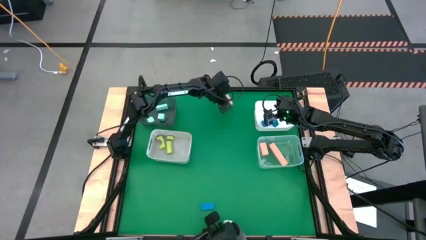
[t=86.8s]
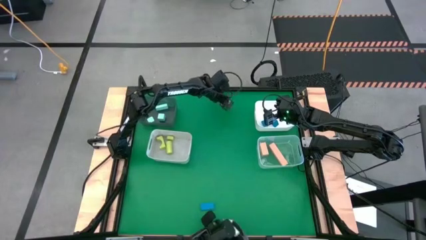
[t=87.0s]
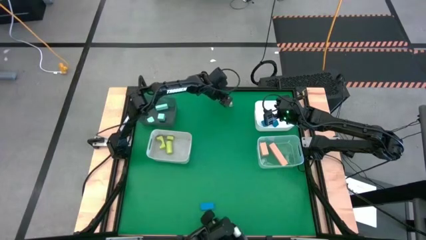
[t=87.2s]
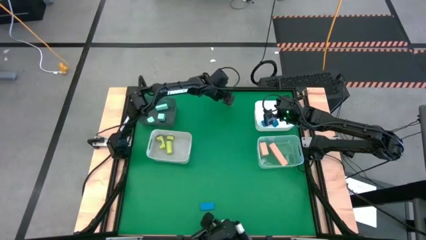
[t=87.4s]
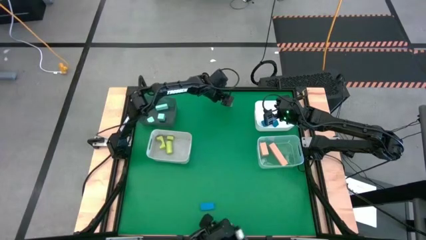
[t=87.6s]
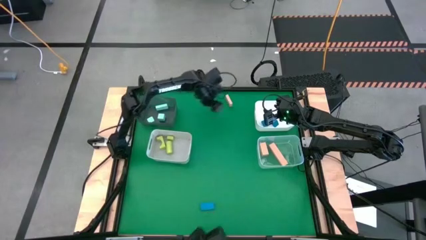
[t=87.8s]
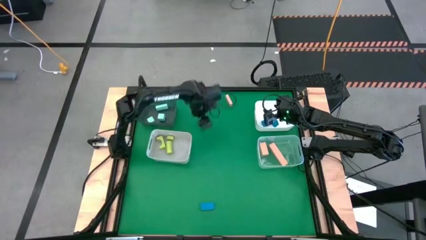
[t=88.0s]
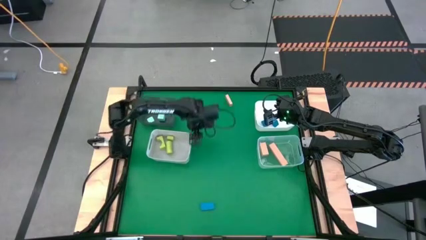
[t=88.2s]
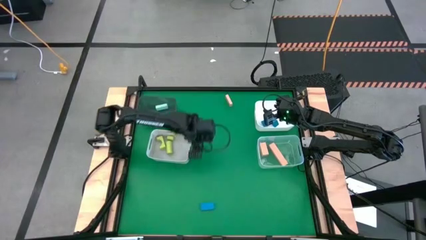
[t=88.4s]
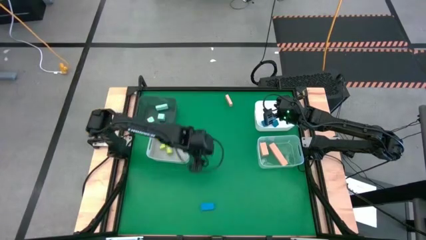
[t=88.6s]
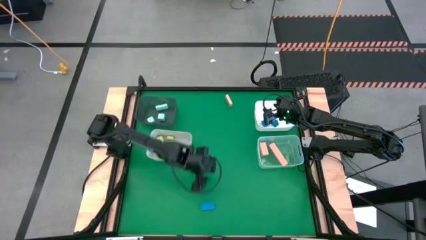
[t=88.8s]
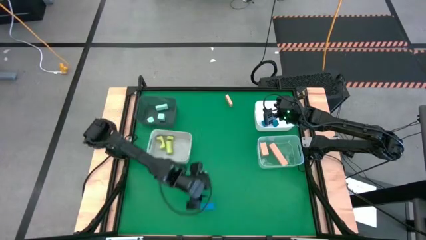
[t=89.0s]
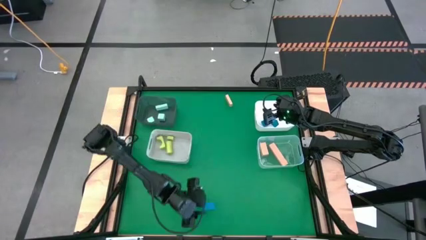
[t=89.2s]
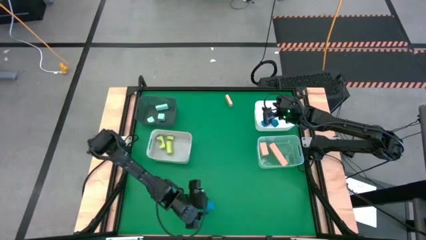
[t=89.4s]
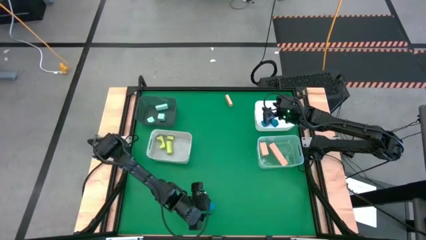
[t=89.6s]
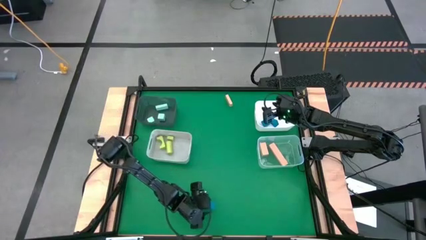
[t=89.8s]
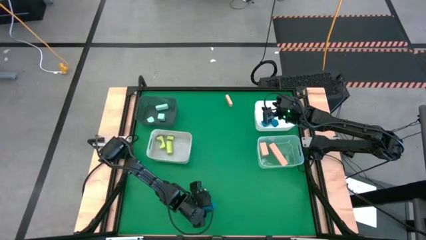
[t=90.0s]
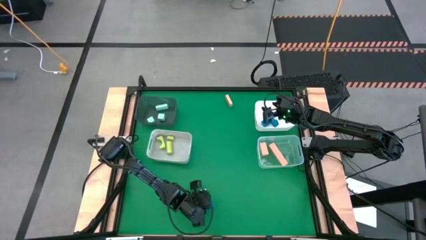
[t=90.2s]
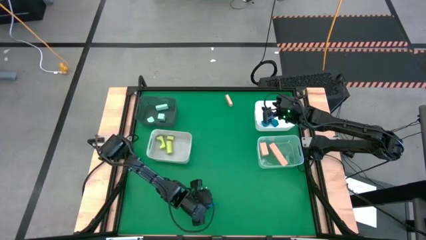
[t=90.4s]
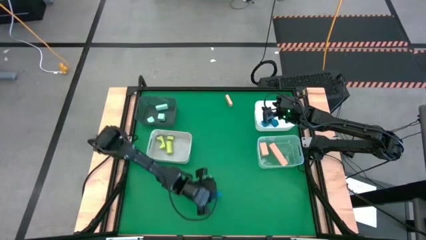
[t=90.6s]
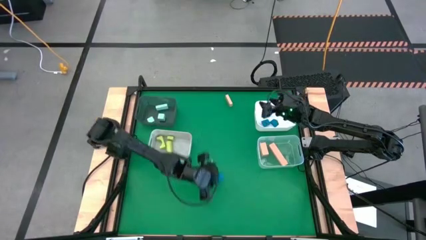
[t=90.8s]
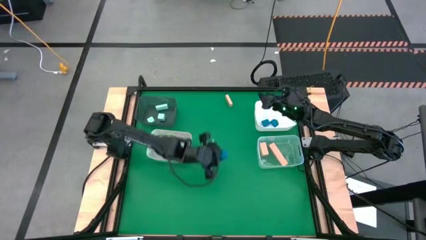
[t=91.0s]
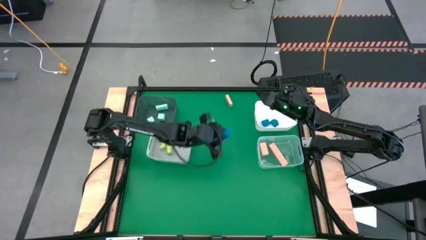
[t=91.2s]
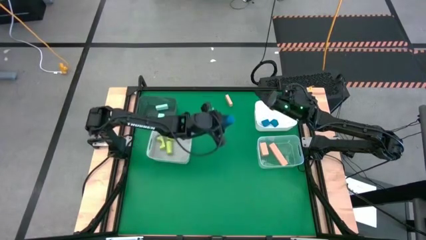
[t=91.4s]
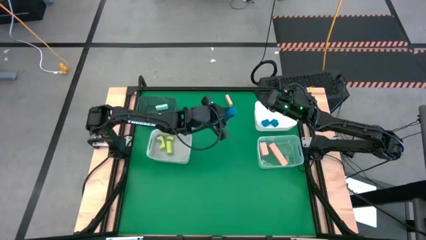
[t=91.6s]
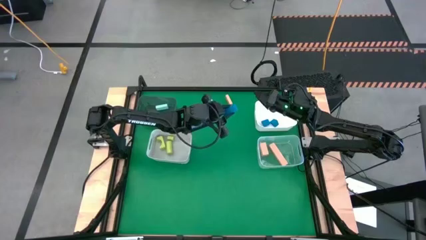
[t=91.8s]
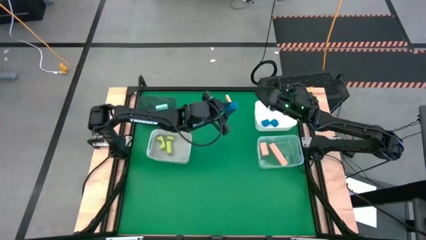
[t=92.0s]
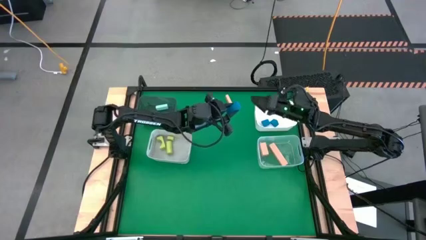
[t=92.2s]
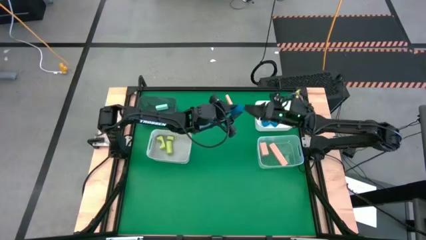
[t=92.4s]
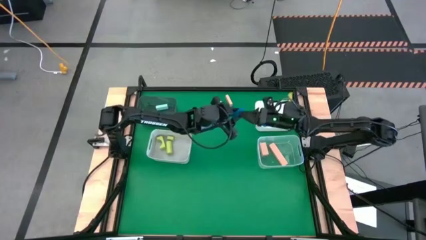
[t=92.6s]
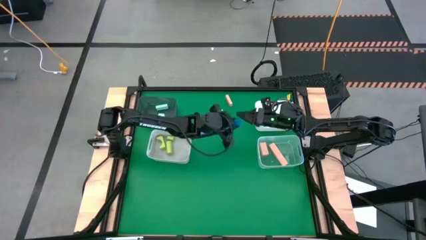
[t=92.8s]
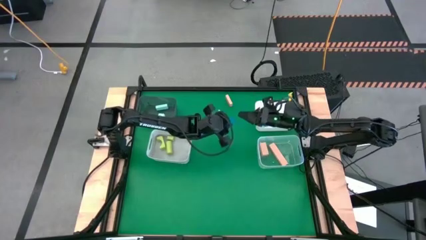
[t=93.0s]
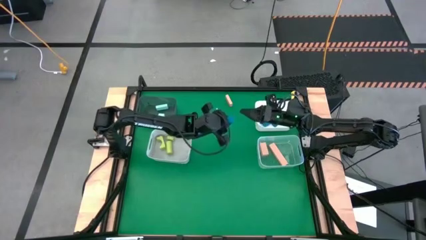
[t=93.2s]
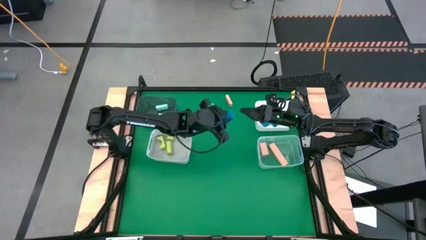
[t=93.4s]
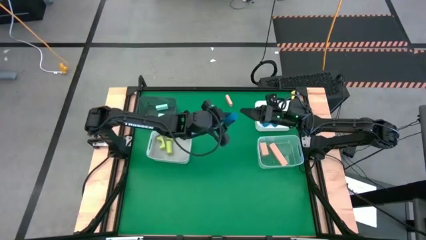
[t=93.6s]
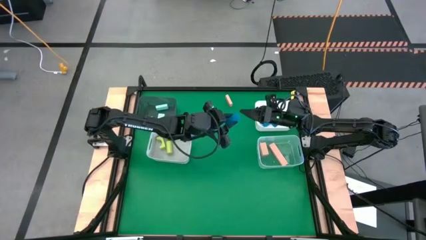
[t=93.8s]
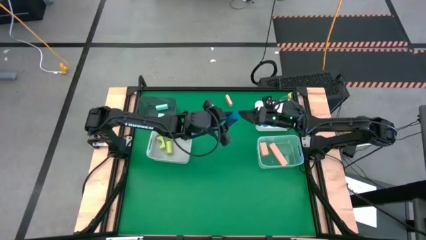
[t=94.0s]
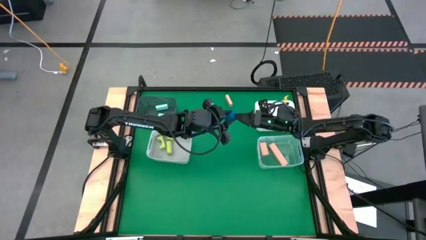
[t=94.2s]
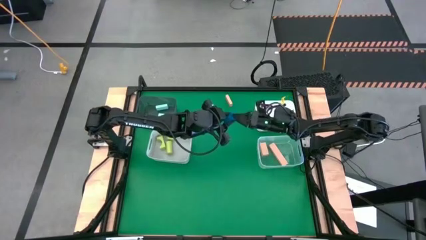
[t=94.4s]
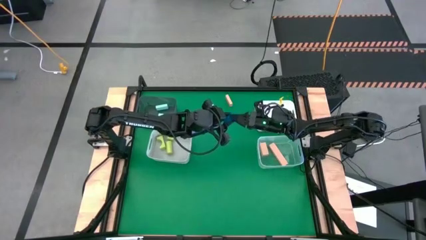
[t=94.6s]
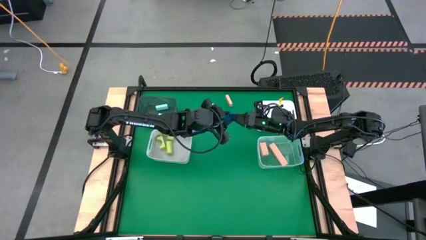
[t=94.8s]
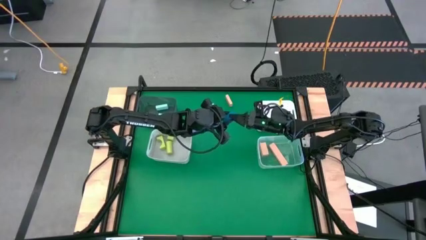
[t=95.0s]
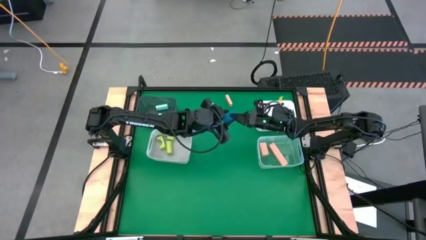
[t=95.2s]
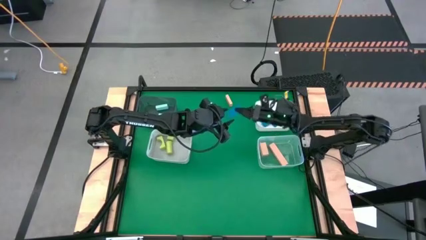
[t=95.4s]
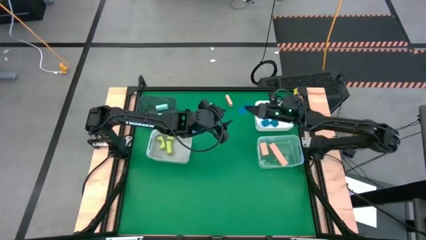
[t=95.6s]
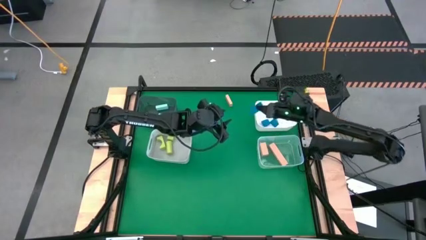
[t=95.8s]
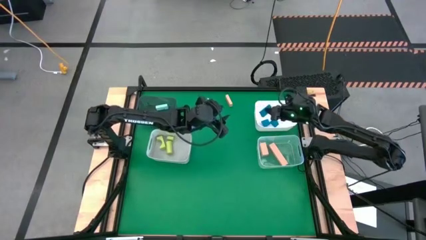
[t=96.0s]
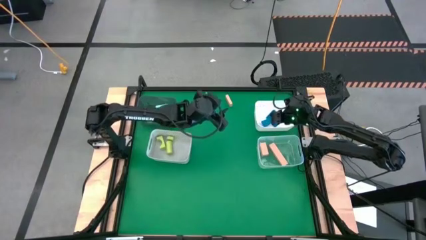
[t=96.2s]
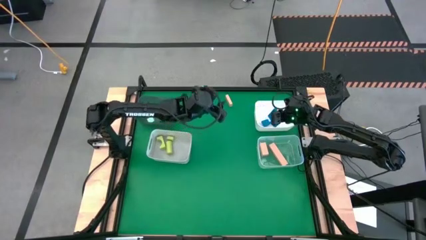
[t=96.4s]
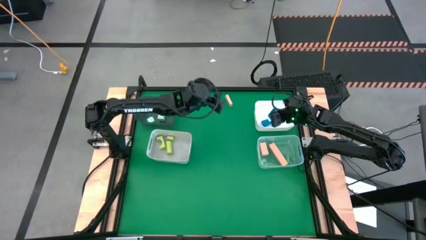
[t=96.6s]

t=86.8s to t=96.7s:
Task: Sort & place blocks by color
Put the blue block into the white bin

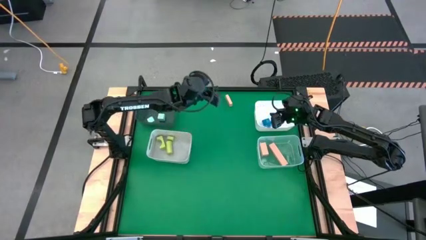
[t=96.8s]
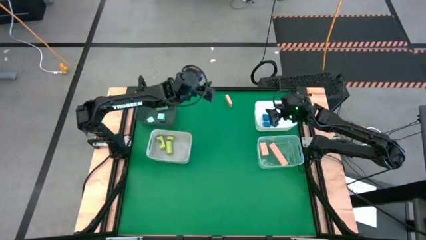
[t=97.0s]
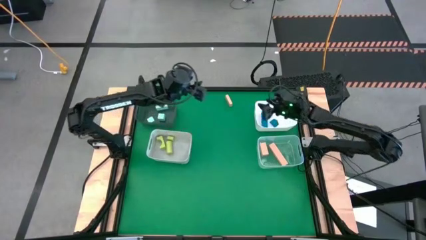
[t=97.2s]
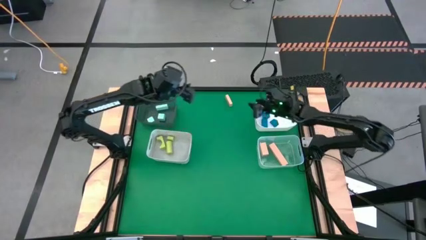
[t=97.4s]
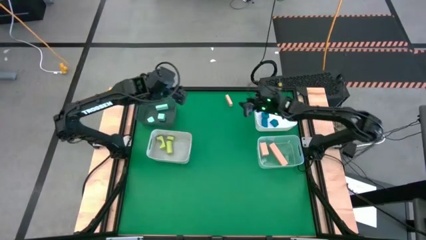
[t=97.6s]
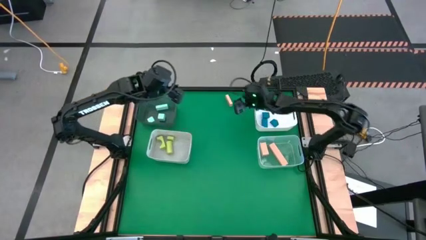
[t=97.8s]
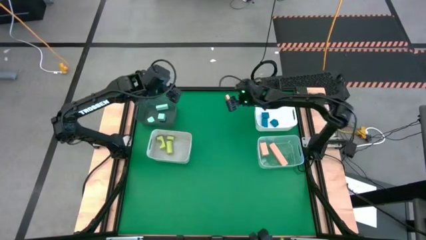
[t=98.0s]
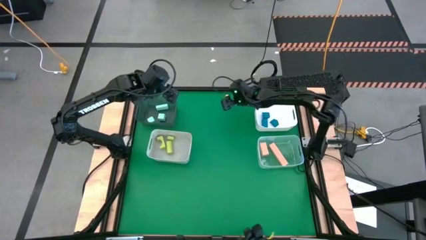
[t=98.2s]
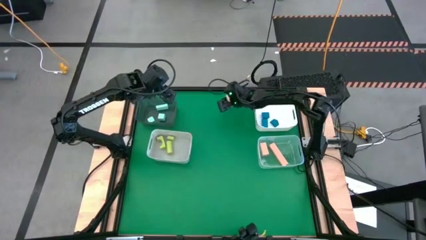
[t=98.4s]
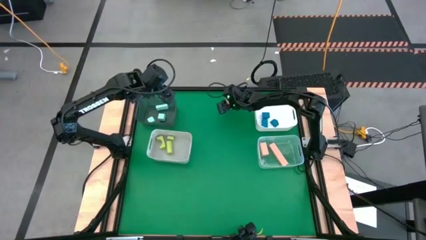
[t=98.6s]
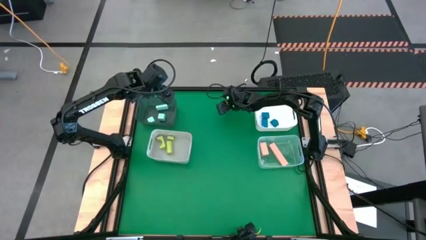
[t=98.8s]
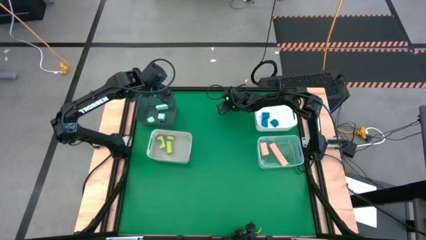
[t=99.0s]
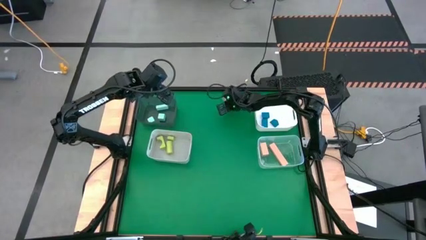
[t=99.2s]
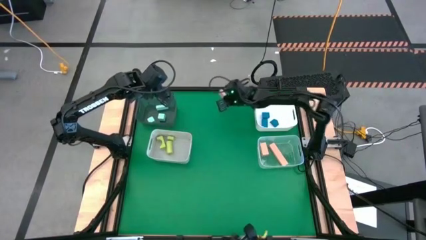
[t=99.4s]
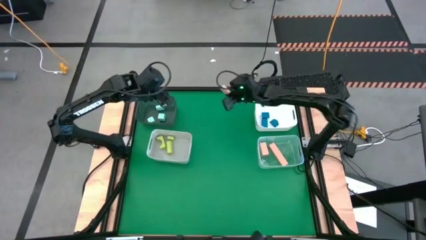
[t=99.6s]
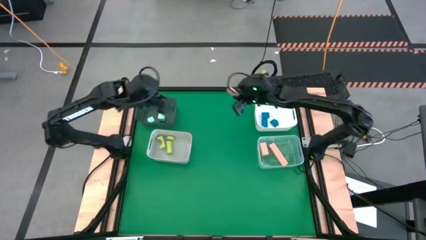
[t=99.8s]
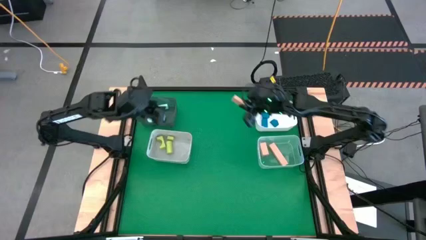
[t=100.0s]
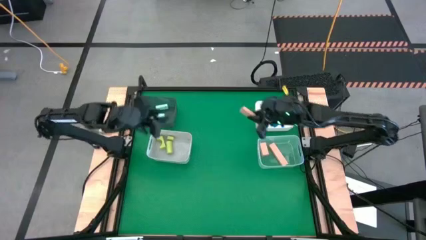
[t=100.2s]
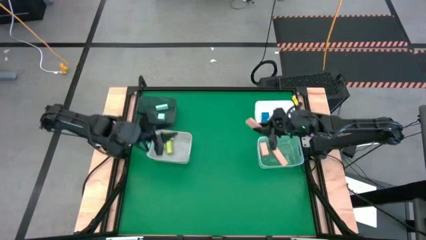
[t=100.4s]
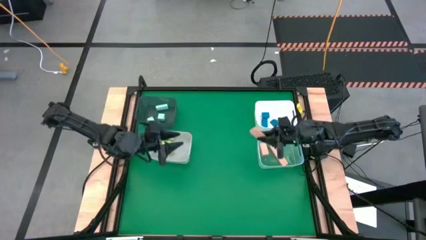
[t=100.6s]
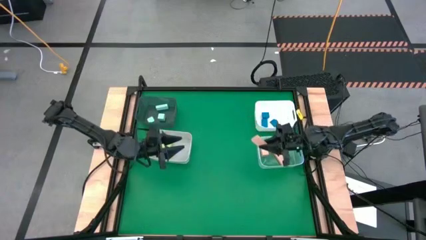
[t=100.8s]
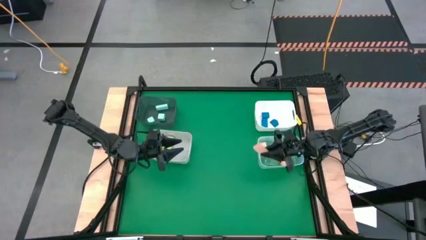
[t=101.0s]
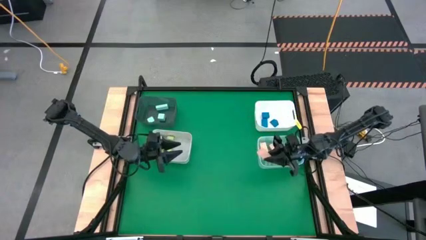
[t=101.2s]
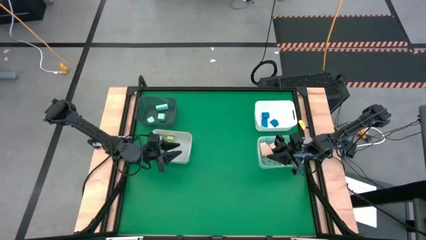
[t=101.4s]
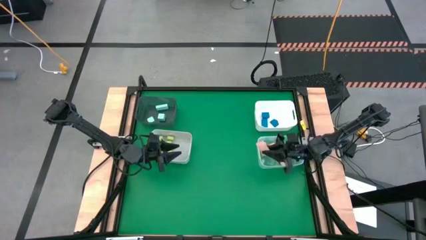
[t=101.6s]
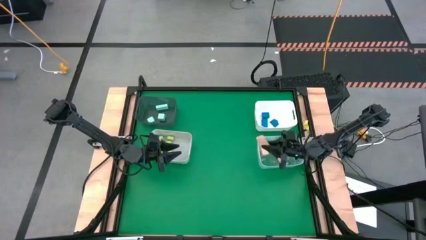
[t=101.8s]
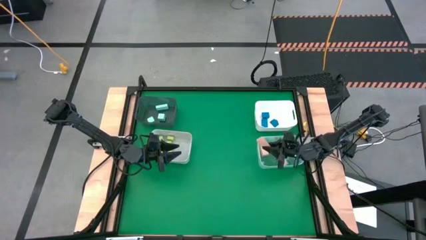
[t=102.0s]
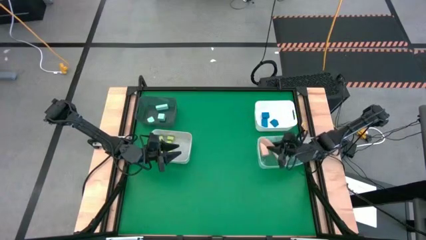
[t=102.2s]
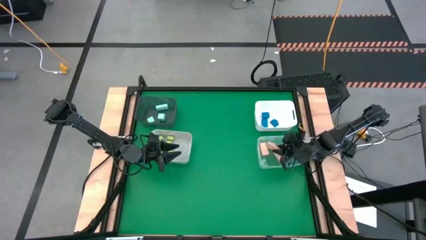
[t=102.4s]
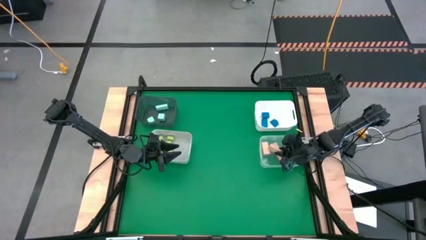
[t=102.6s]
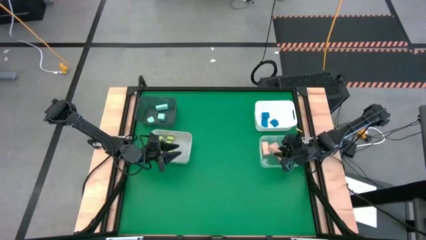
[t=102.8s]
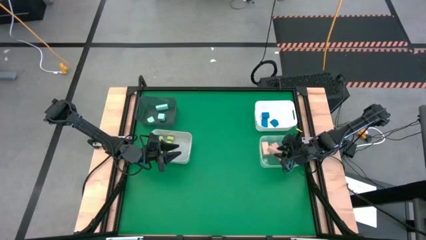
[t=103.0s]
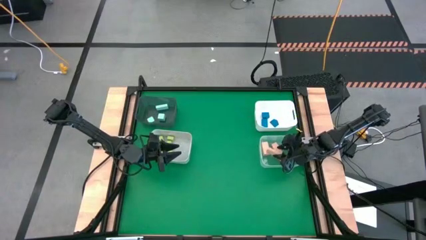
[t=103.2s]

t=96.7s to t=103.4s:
Put the brown block into the transparent bin
